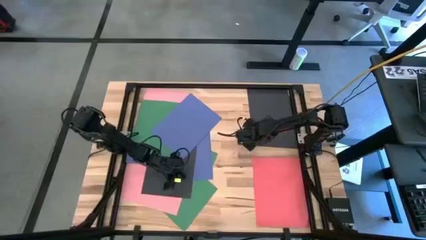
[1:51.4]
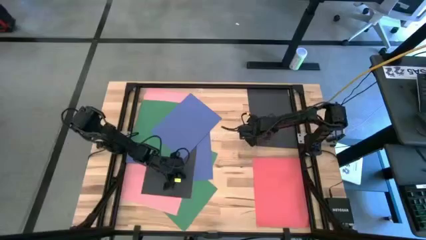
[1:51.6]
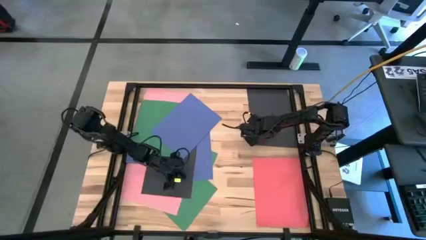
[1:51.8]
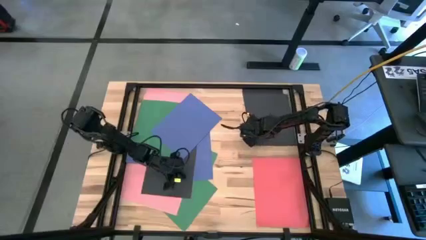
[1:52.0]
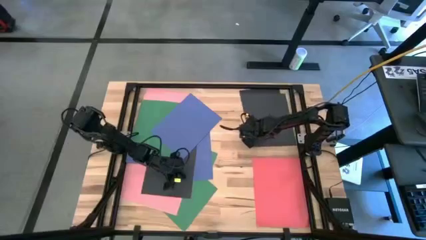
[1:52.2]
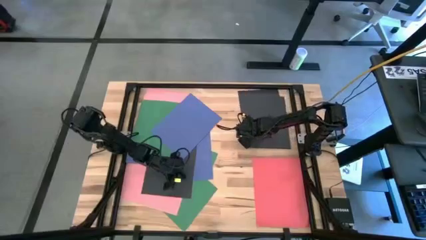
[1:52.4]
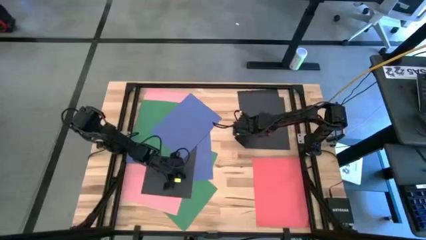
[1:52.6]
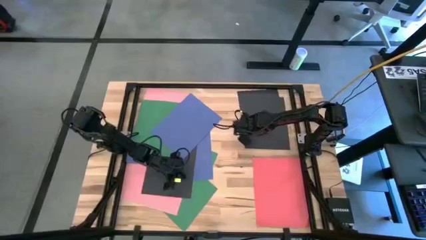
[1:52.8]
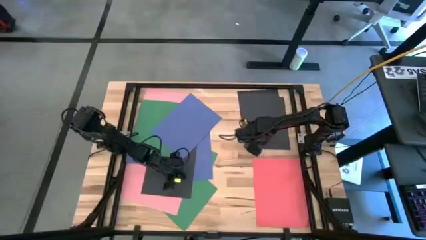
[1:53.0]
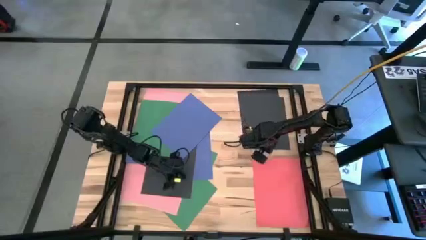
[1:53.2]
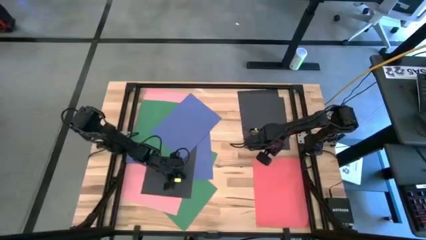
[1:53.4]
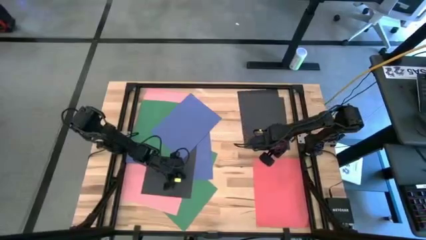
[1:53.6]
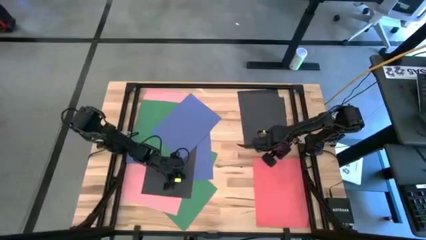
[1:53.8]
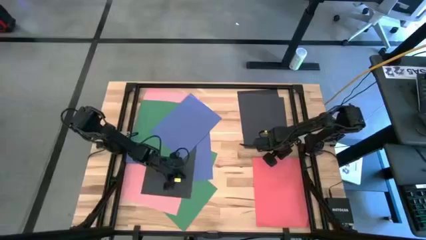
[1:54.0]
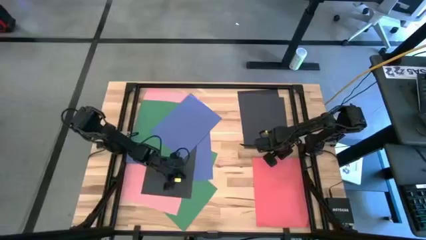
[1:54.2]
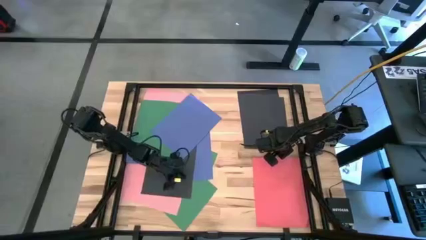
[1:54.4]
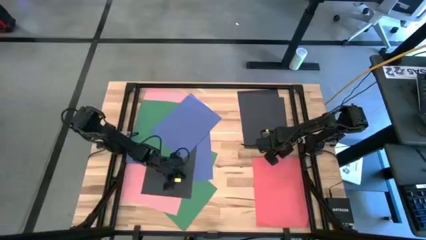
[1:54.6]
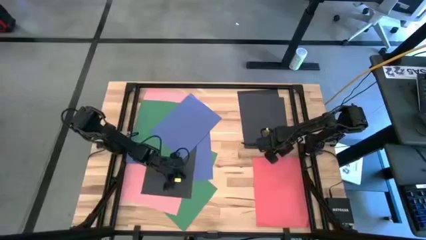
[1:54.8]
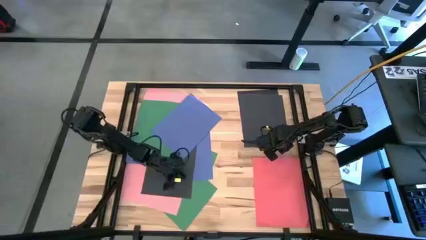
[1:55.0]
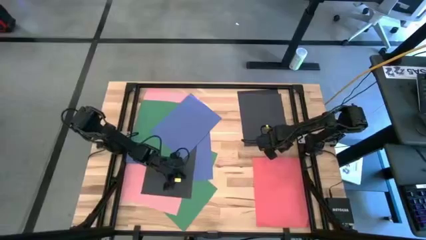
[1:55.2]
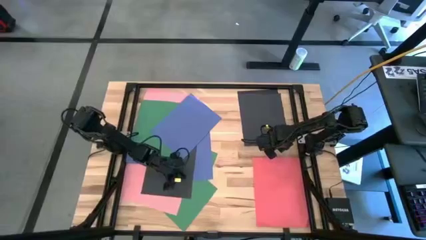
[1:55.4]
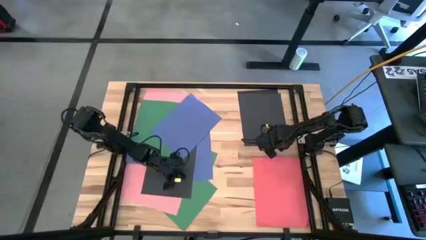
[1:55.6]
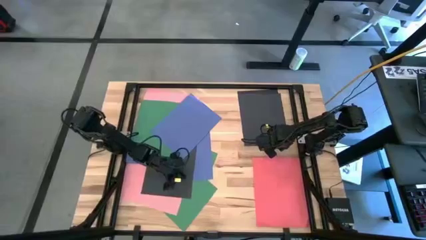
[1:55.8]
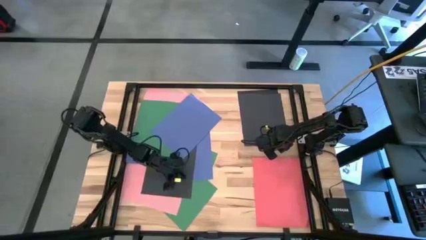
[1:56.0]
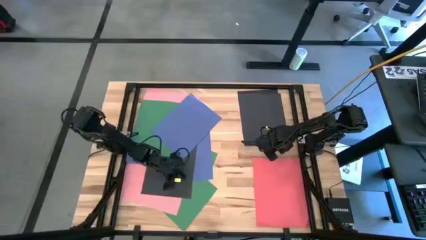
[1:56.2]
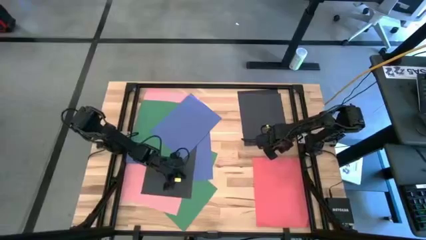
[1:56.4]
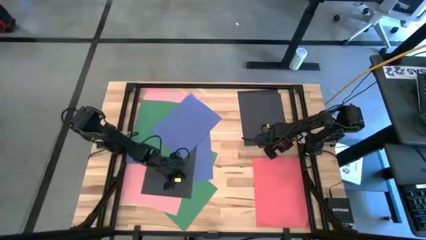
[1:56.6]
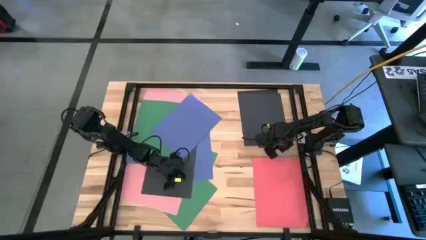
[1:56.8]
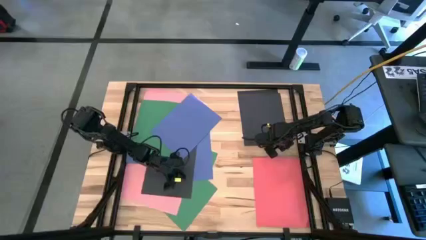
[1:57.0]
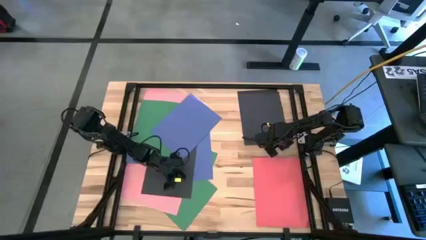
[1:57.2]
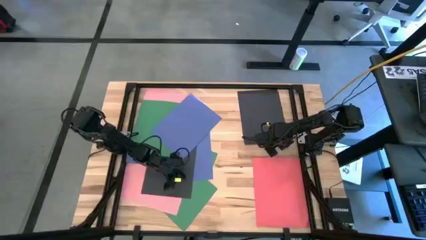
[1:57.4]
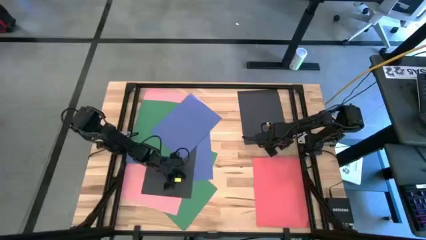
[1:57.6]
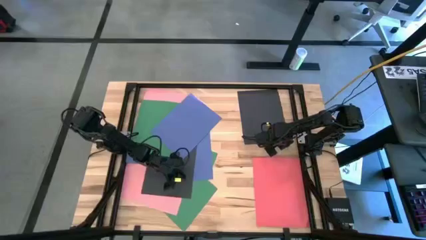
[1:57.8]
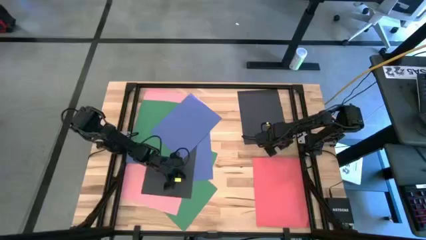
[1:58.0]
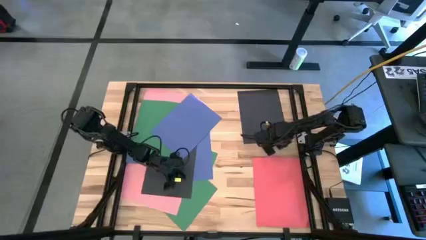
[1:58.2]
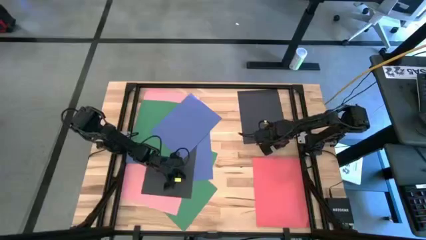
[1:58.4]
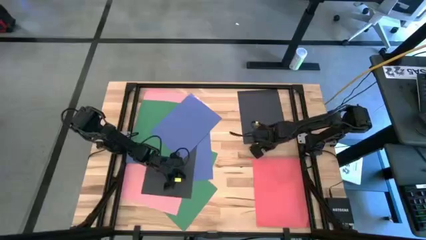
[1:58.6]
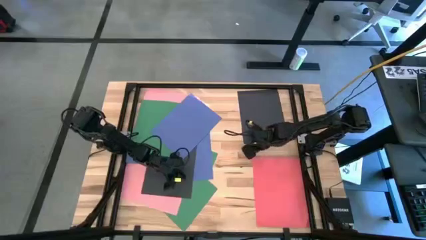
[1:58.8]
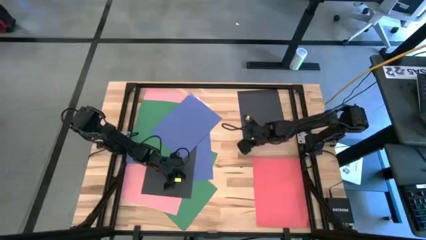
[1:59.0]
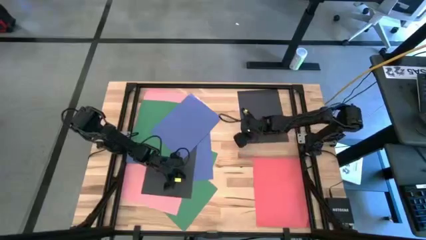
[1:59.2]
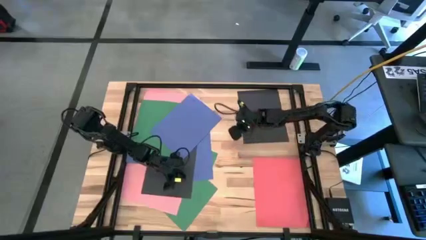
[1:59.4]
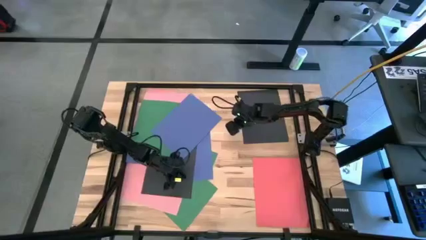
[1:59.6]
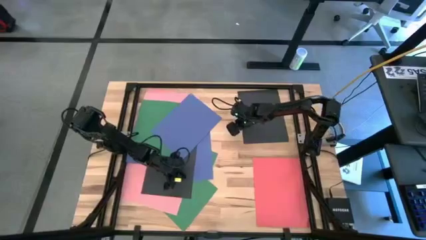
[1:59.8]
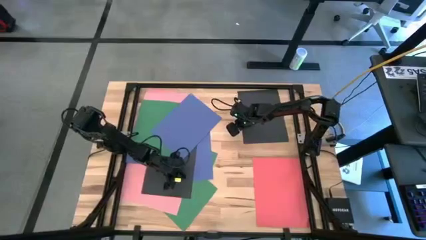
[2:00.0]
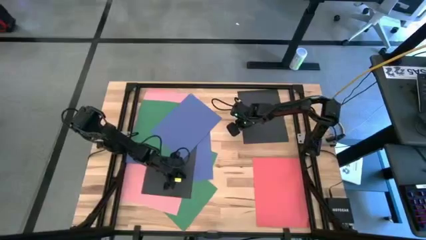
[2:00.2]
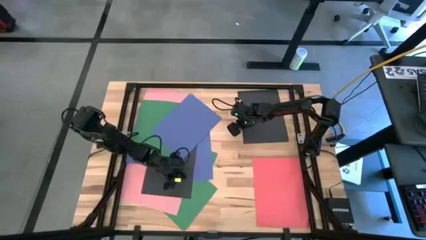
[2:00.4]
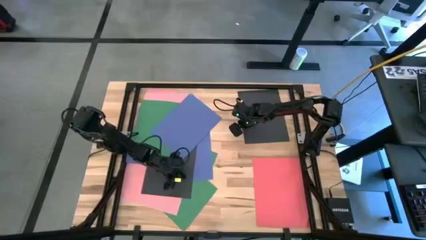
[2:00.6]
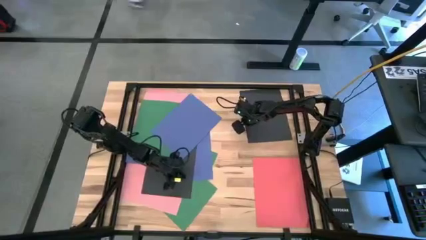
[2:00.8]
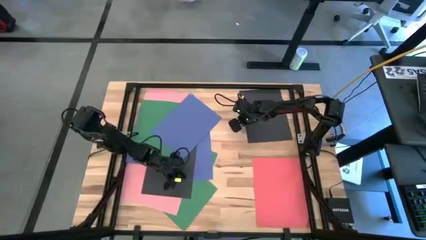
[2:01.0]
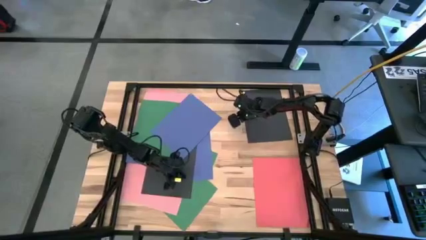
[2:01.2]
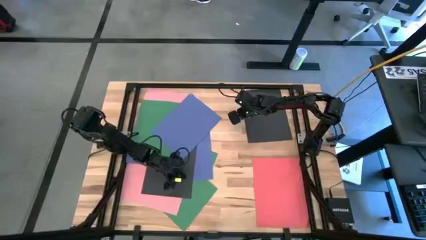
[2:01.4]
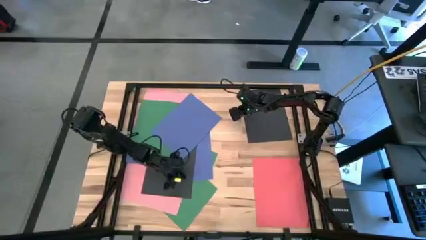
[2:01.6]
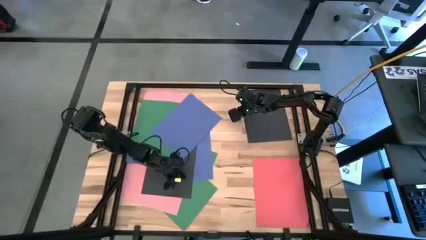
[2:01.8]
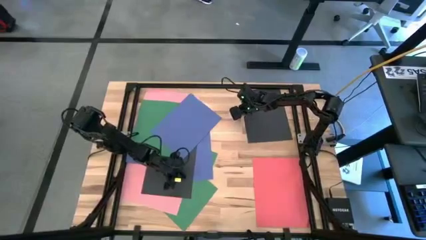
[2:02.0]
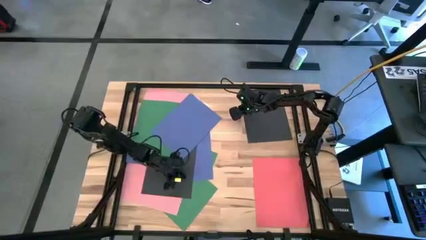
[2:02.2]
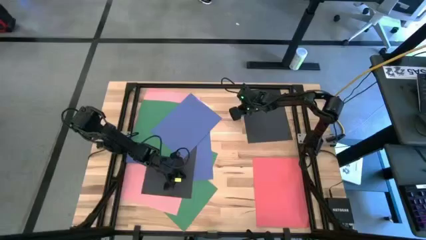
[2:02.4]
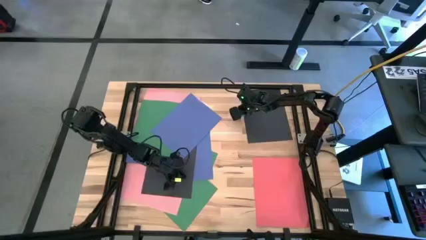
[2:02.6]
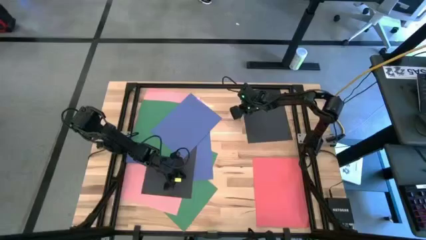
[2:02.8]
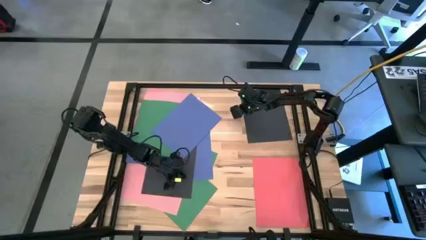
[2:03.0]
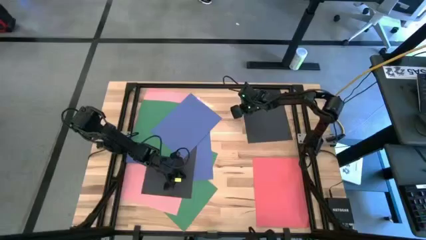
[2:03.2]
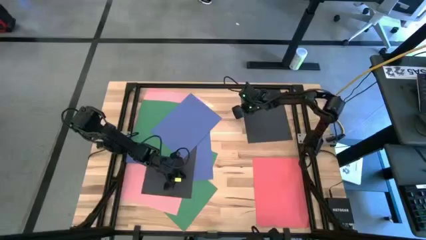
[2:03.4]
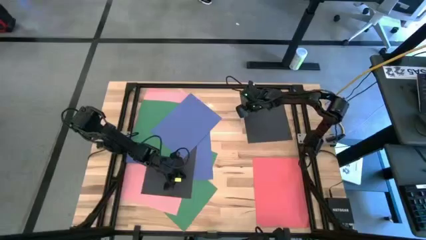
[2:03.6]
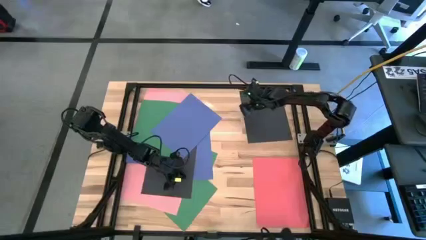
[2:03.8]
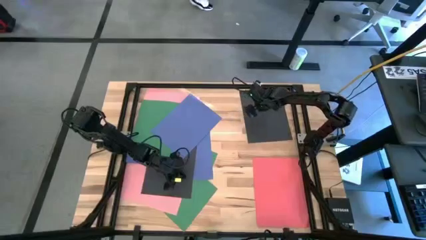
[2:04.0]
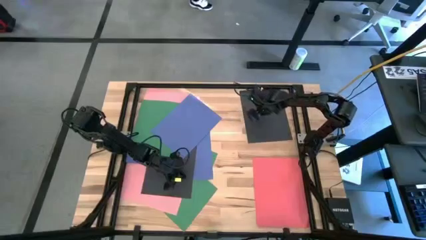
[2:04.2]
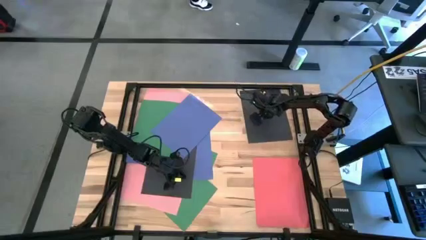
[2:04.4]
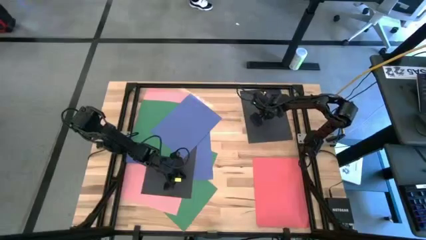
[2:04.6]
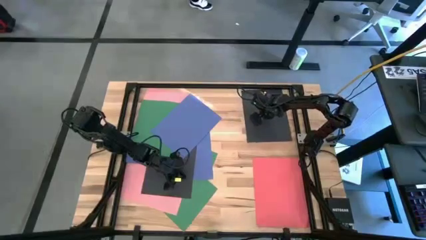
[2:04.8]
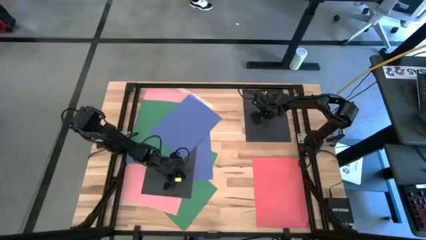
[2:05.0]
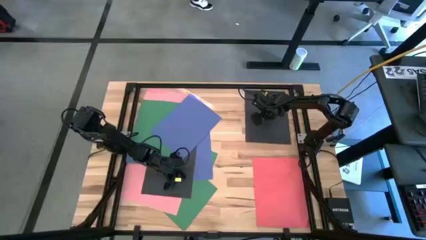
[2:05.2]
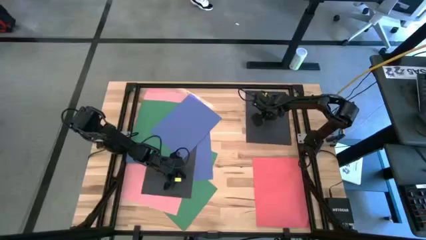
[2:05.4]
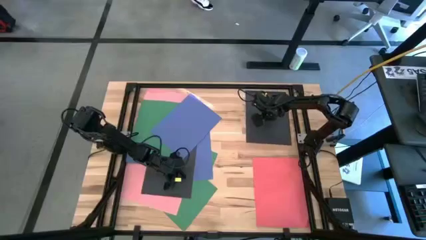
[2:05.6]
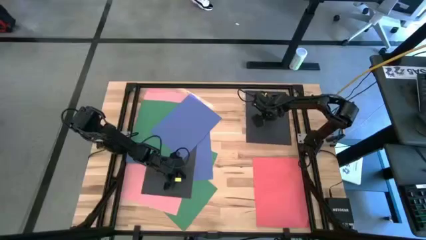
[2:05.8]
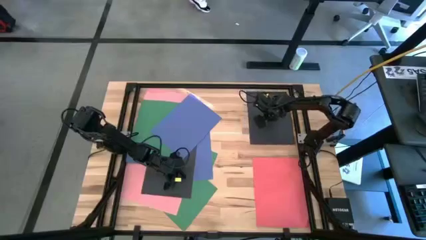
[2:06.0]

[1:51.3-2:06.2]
Task: Organize paper
Stack the black paper on top of the other black paper on the table

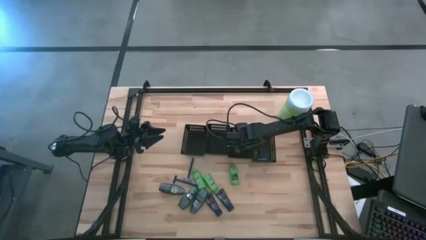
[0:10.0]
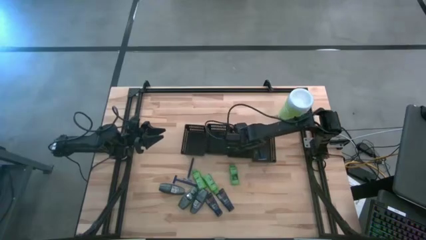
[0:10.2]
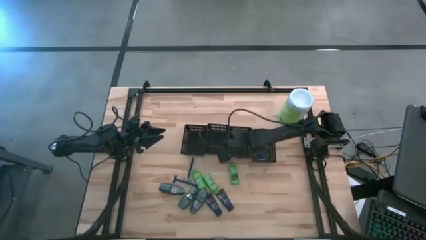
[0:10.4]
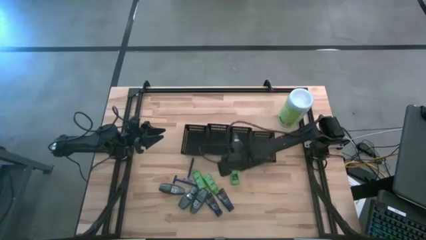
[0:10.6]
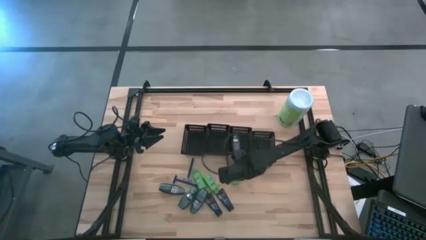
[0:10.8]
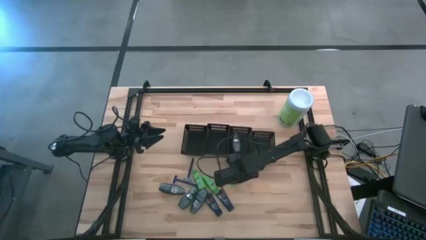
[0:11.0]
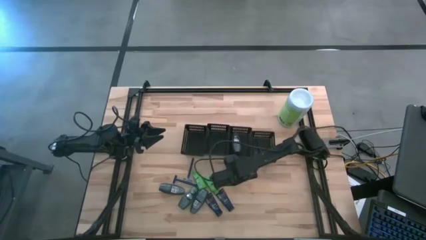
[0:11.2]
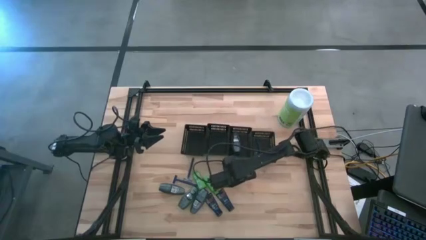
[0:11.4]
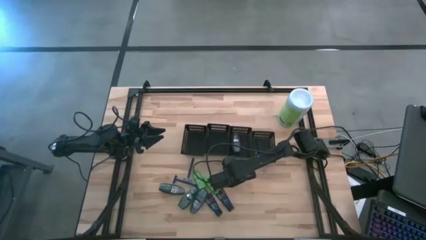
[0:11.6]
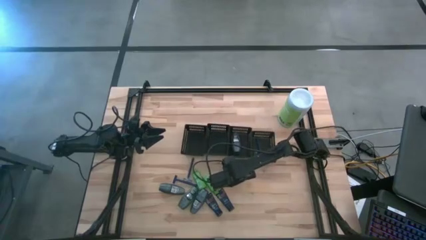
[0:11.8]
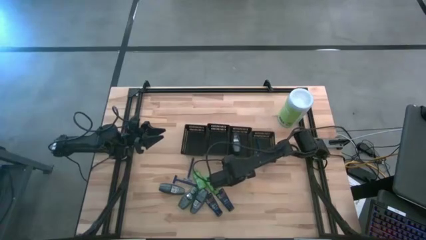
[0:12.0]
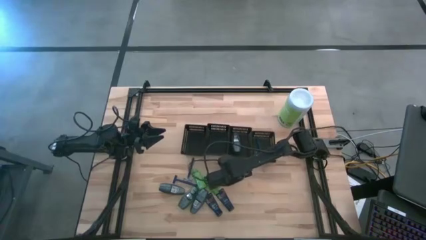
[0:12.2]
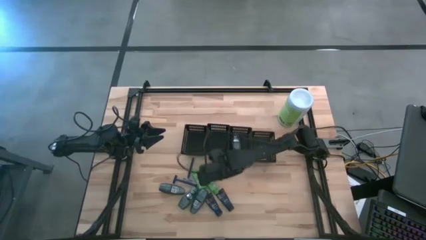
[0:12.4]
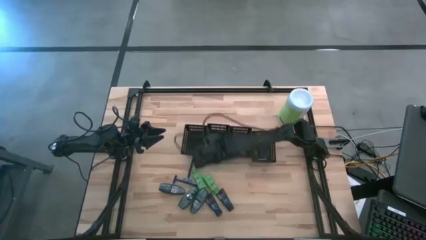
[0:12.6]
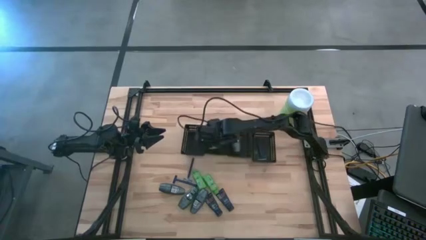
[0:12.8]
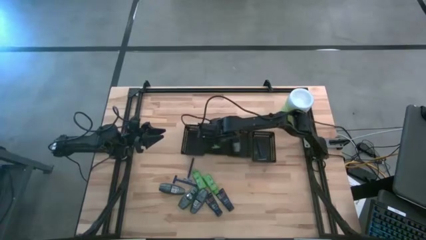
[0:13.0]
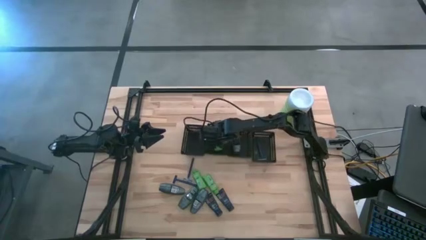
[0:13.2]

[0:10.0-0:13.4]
Task: Pick & Place Travel size toiletries
Put the shampoo into the middle left black bin
